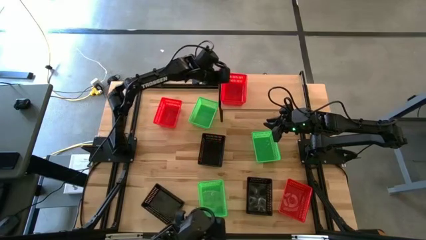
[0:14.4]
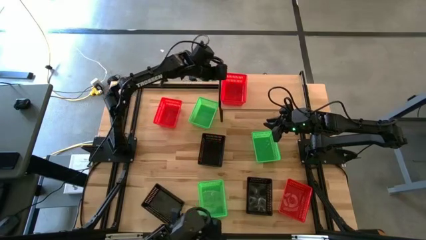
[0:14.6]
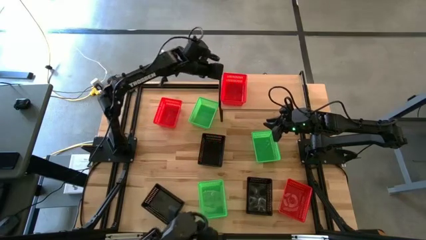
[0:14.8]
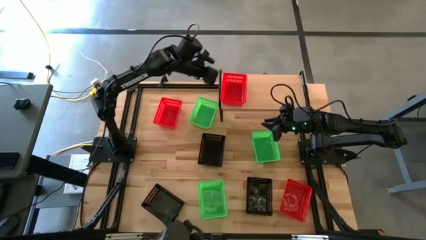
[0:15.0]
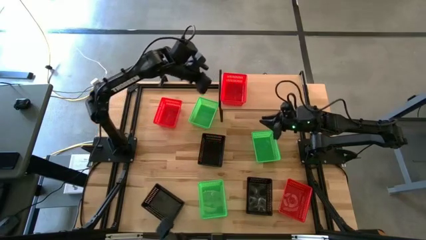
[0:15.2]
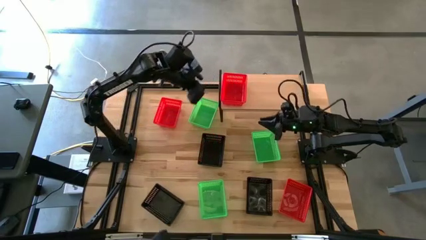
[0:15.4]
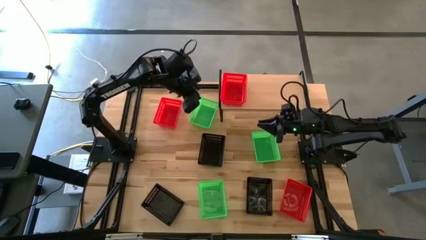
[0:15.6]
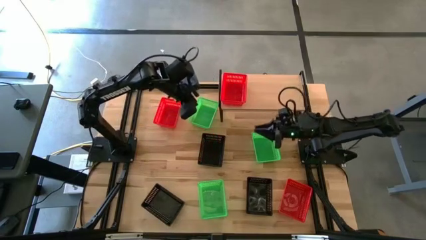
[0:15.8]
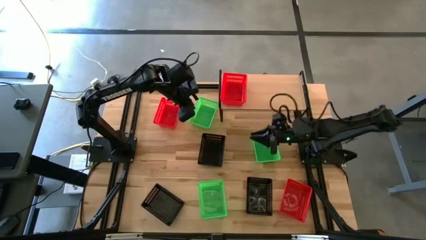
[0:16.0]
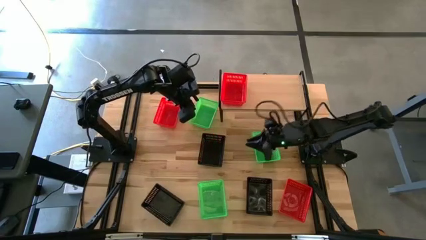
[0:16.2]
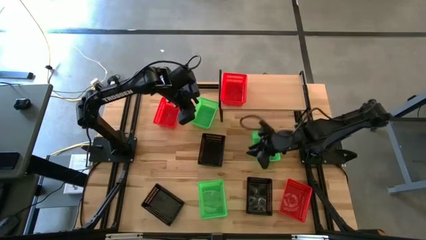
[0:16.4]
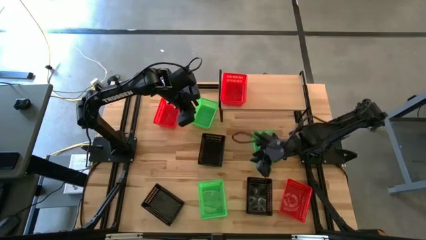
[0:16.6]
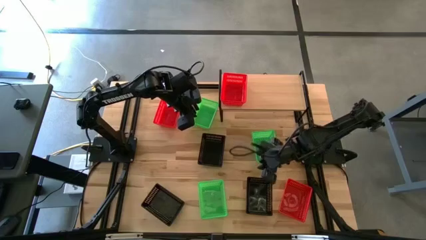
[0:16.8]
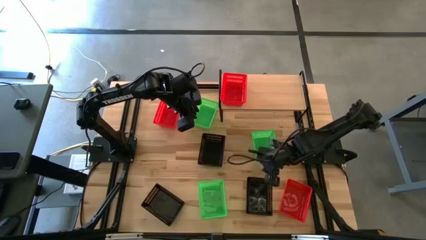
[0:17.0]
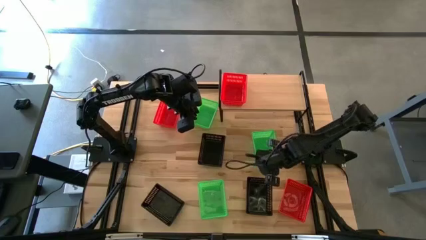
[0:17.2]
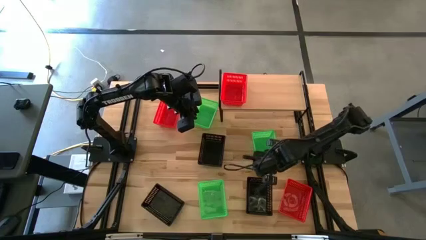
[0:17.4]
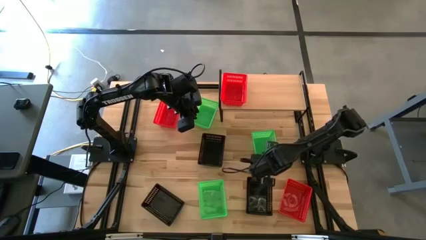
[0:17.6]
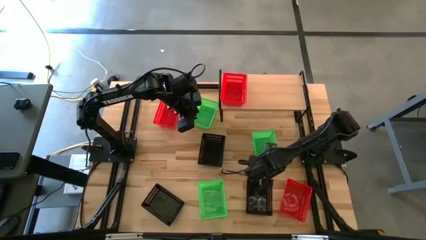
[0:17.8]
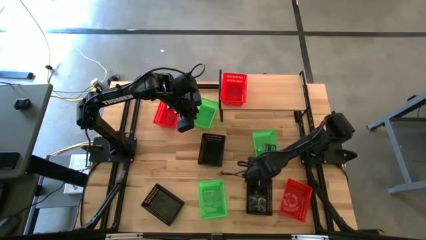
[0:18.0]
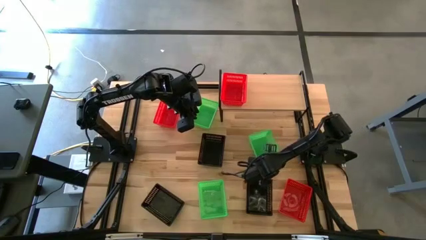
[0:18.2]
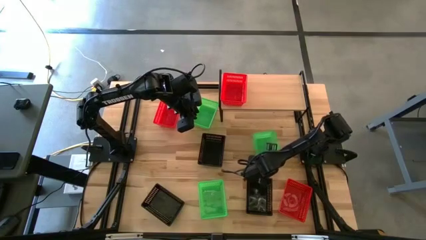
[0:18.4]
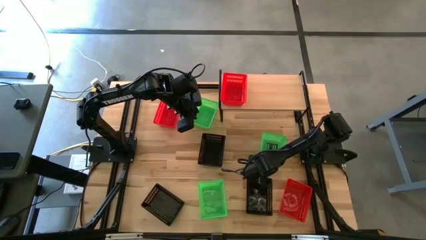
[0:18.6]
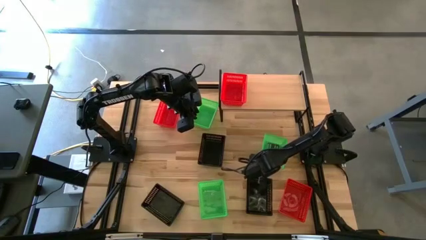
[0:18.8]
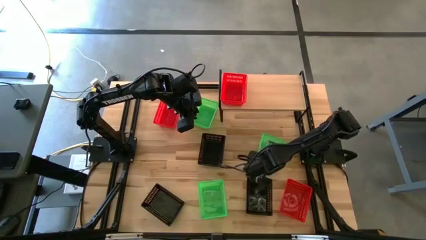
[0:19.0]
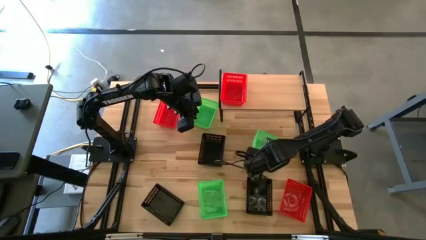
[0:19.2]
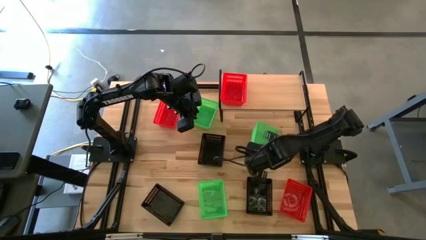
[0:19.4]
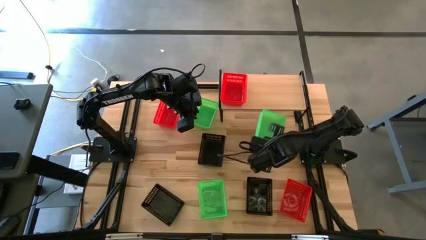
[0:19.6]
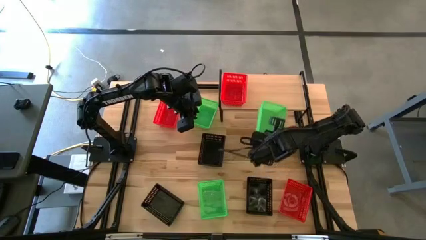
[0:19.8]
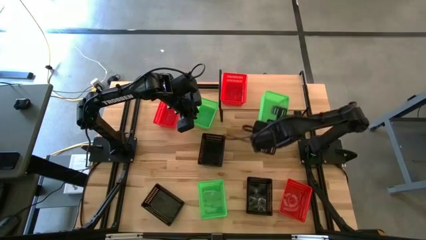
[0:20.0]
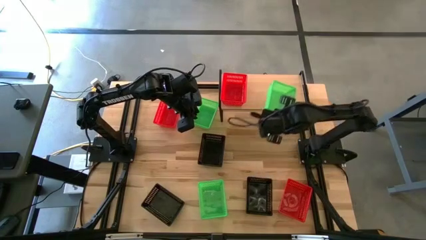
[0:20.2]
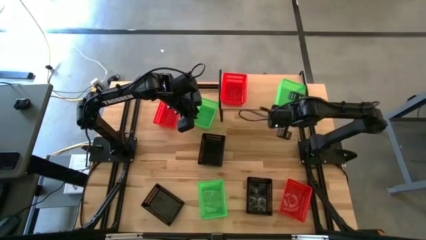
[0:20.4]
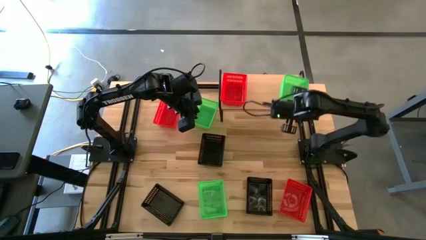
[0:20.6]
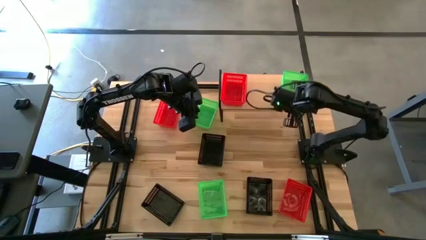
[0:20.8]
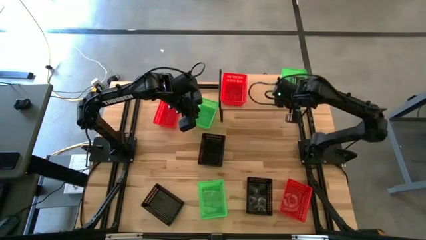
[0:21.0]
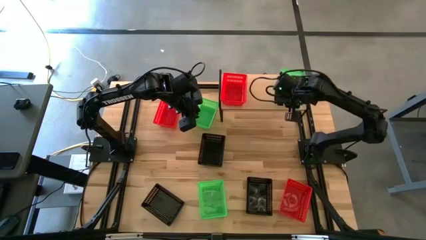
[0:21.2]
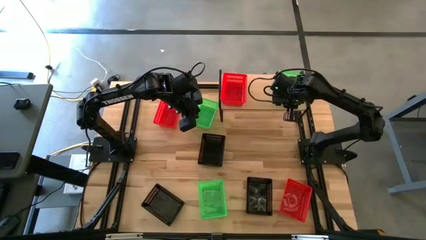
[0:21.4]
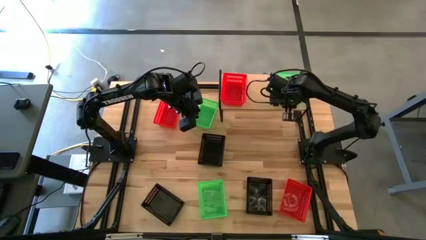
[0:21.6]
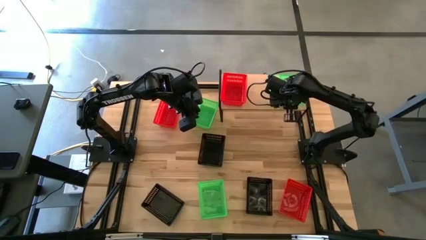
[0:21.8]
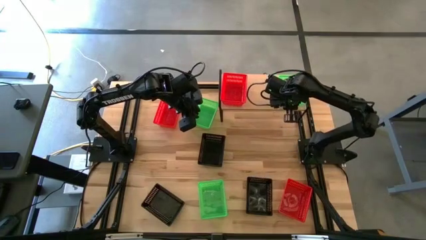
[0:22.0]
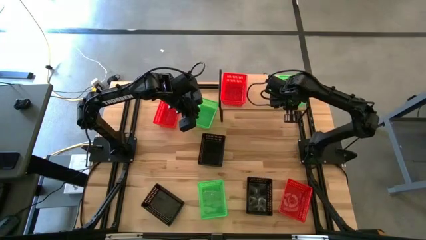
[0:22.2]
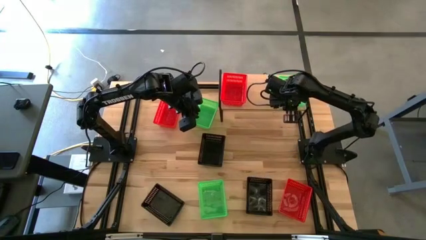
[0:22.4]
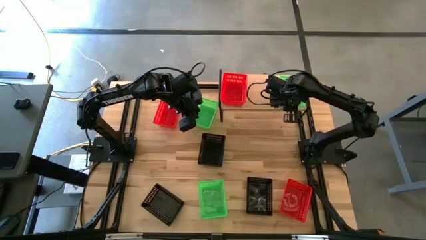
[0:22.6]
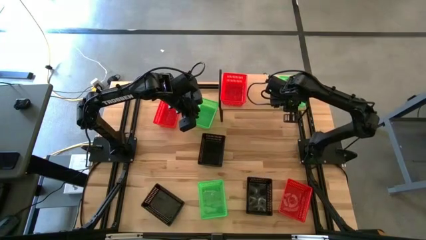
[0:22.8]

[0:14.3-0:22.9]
Task: Stack baskets on shelf by color
Put the right green basket on the shelf

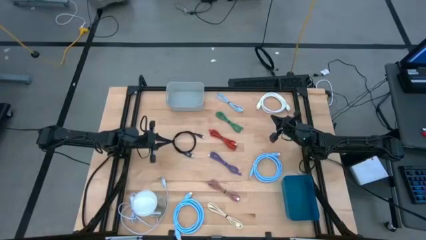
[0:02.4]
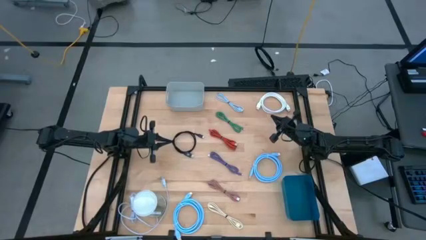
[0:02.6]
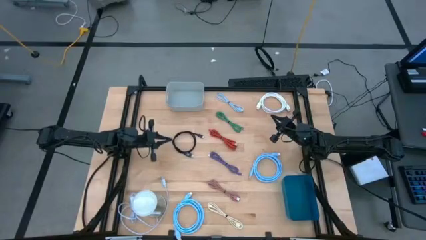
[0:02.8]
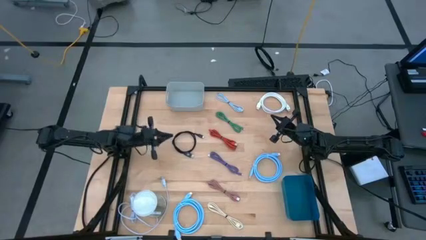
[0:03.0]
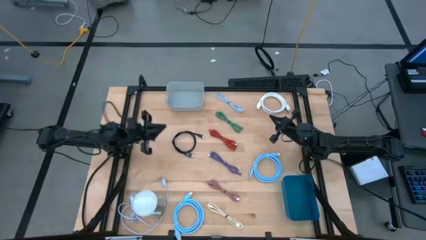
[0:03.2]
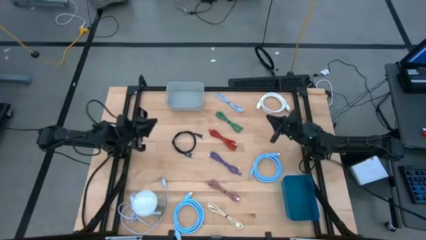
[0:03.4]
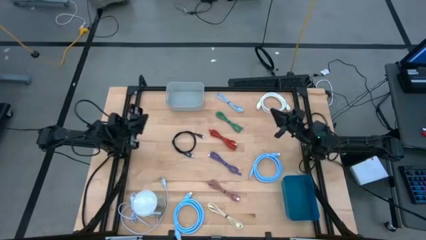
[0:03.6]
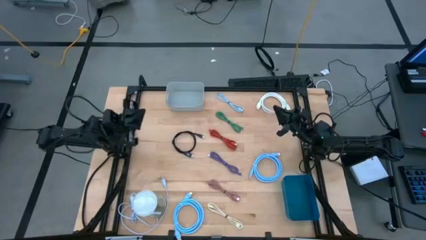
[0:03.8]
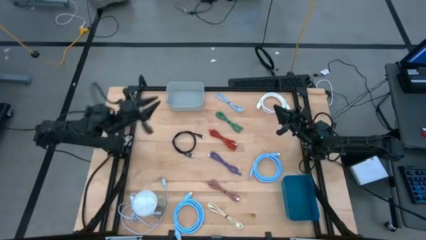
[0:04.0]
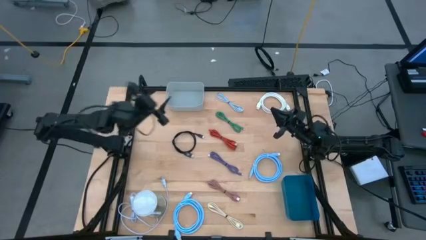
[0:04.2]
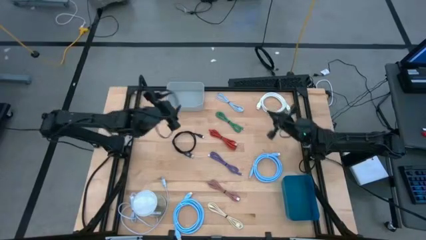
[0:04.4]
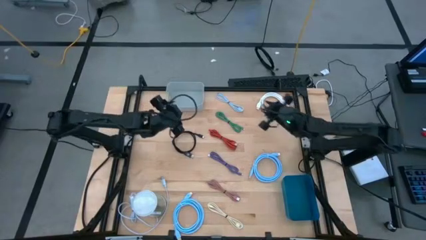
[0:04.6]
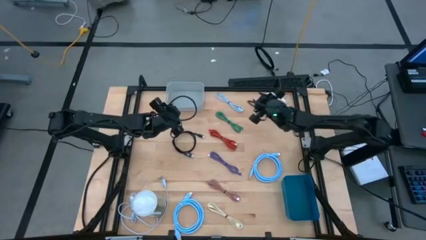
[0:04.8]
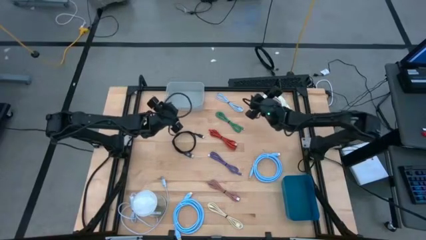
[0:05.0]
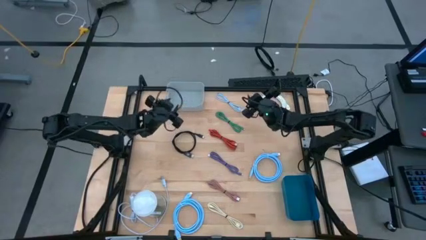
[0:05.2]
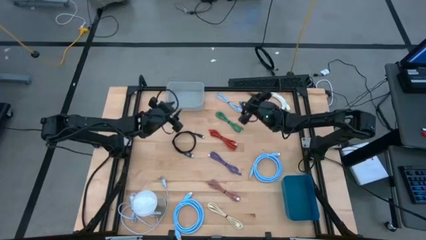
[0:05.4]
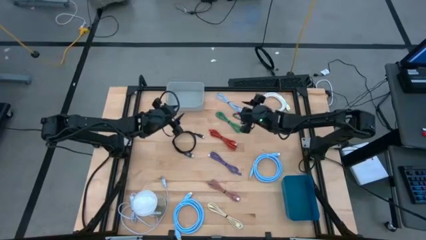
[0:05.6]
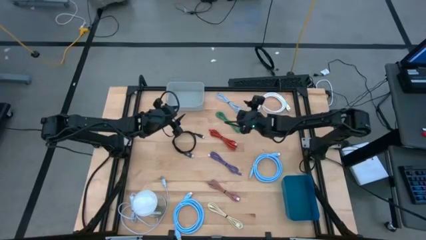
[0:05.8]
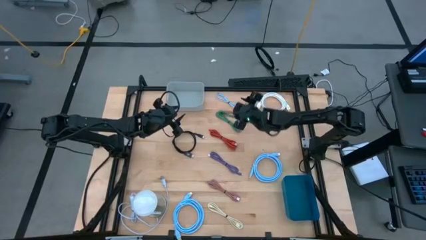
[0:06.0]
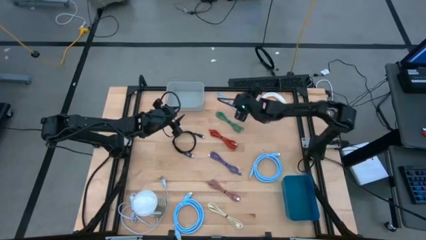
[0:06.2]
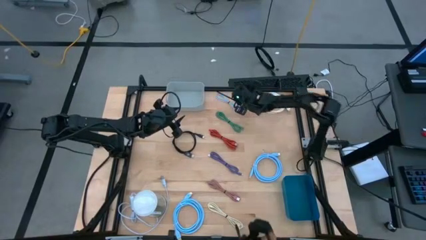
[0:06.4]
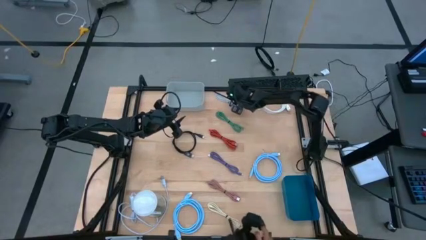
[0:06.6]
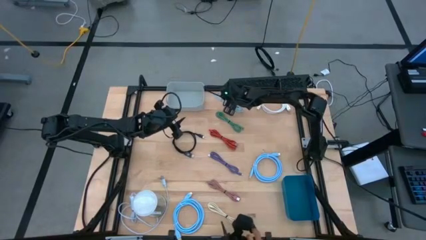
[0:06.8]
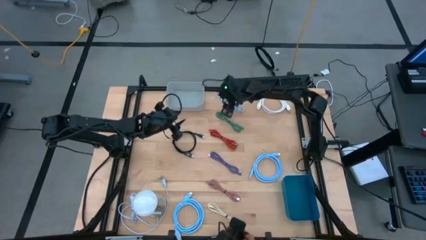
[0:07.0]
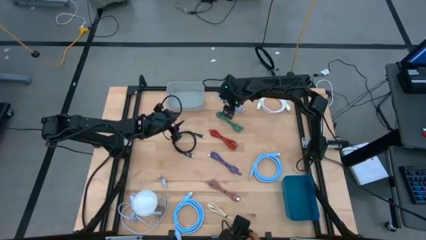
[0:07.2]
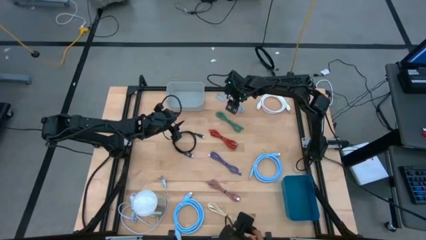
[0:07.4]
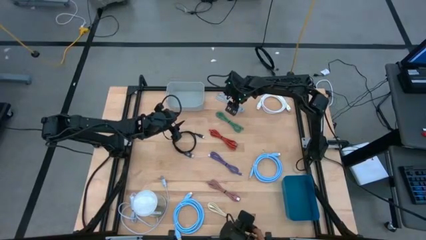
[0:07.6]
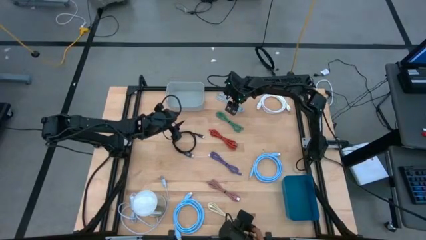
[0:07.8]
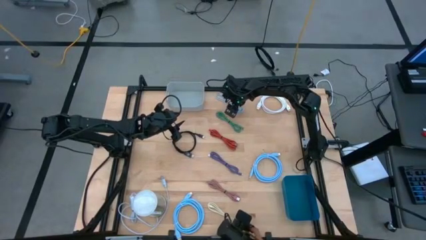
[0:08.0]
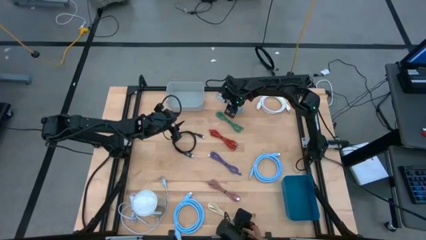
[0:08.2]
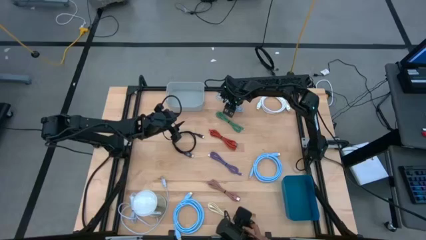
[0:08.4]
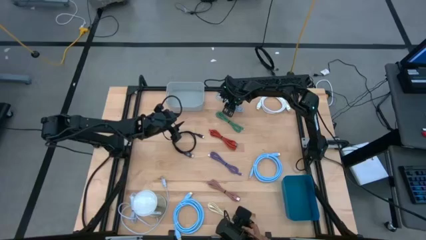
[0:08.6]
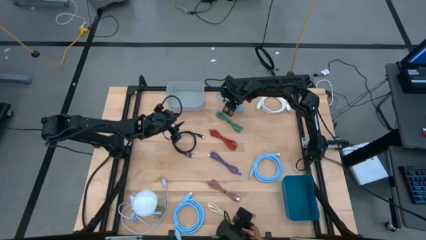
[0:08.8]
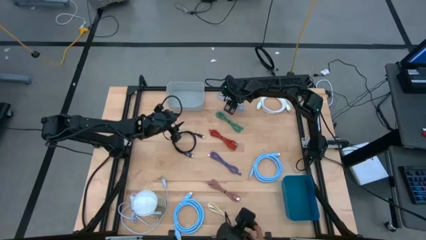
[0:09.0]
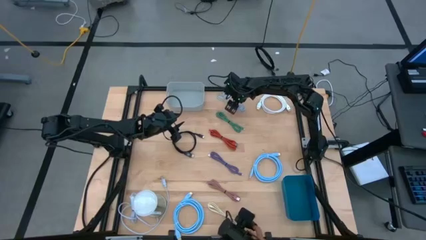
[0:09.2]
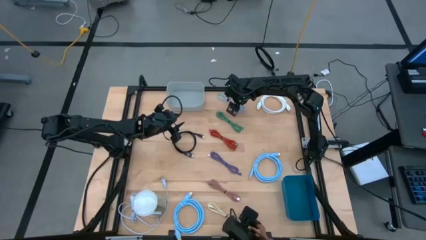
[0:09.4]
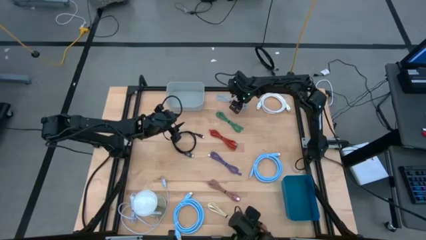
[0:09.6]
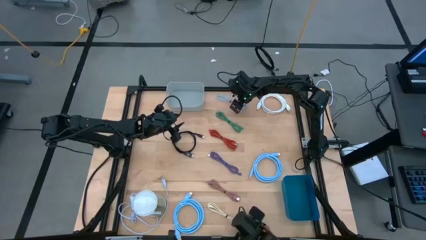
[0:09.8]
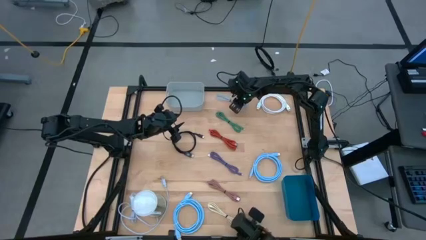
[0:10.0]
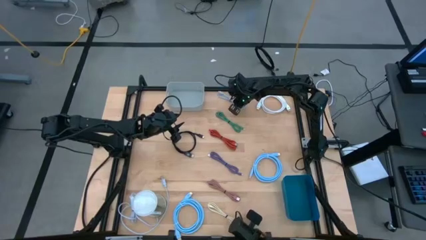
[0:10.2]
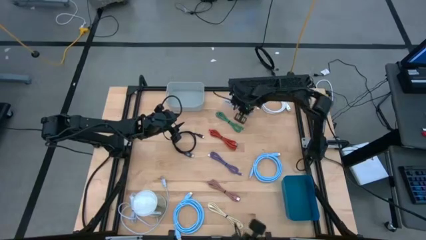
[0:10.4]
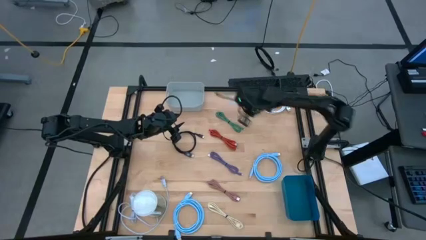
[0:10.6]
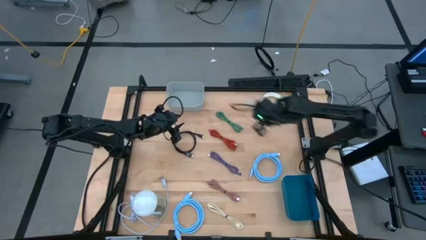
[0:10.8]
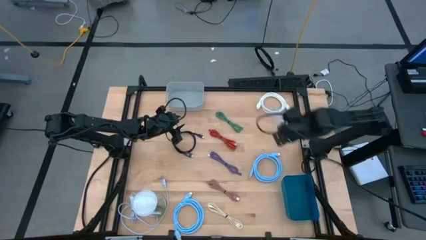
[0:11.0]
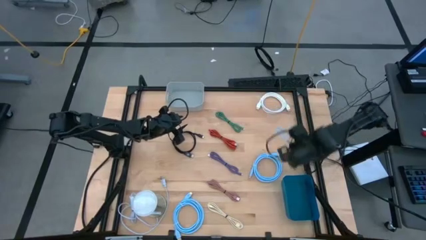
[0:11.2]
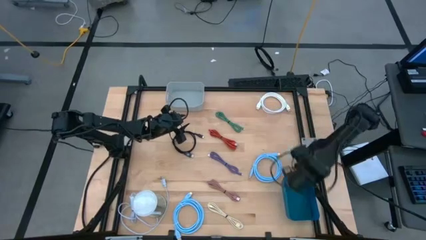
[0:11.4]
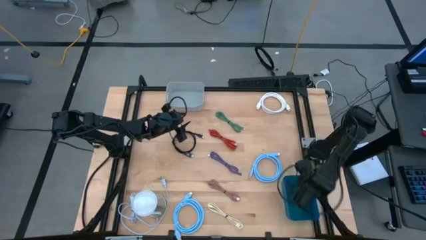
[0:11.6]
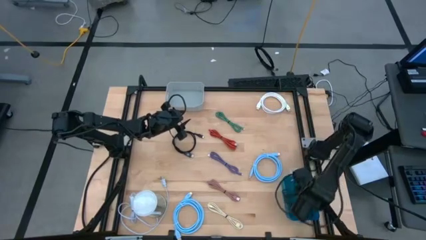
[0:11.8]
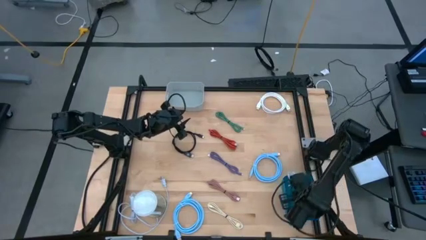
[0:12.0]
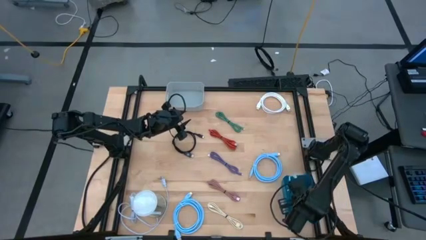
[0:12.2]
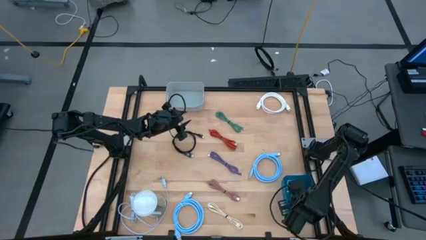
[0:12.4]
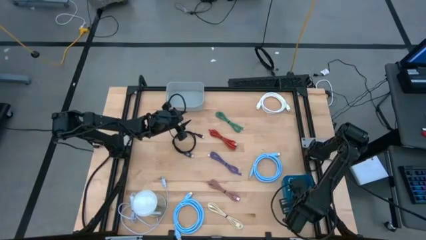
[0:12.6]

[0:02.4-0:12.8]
Task: Pick & Place USB Port
Put the blue USB cable into the blue bin
